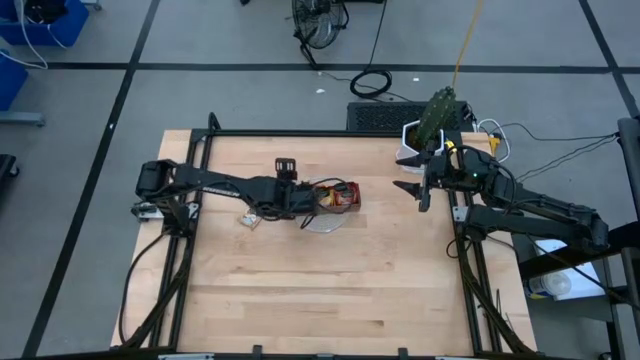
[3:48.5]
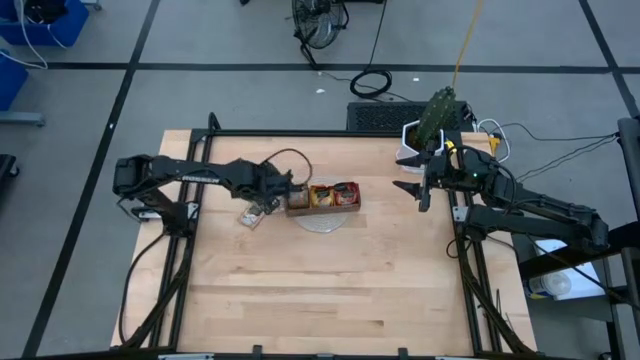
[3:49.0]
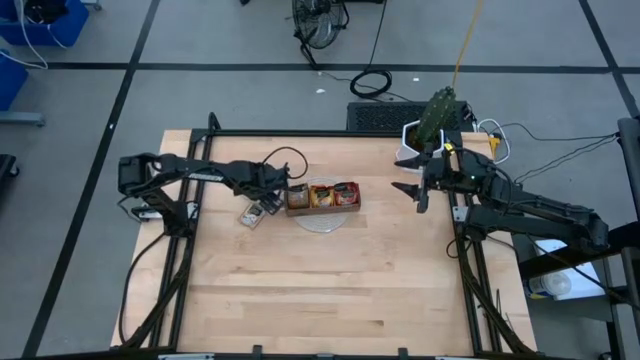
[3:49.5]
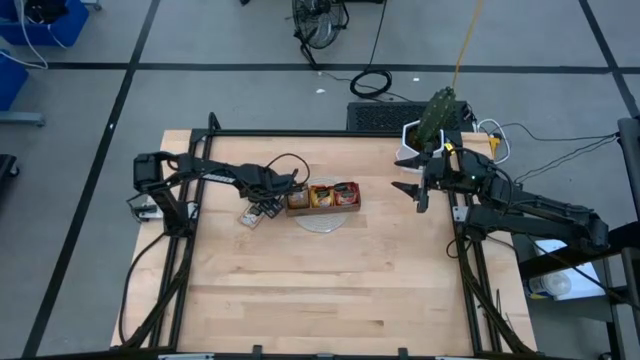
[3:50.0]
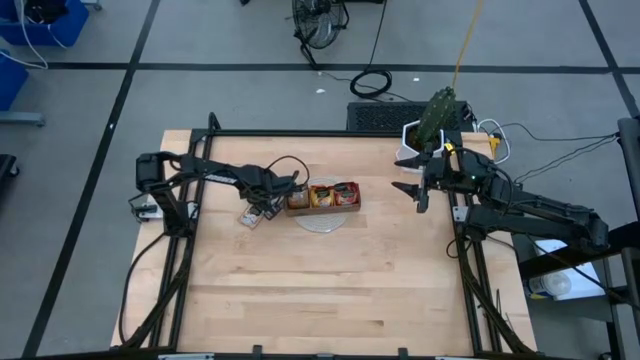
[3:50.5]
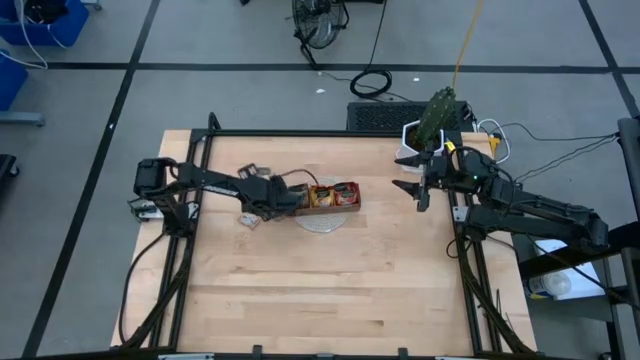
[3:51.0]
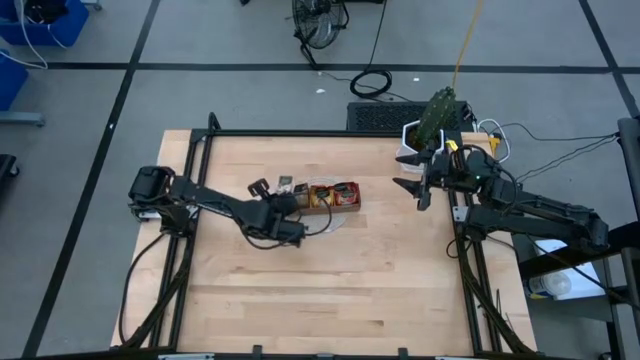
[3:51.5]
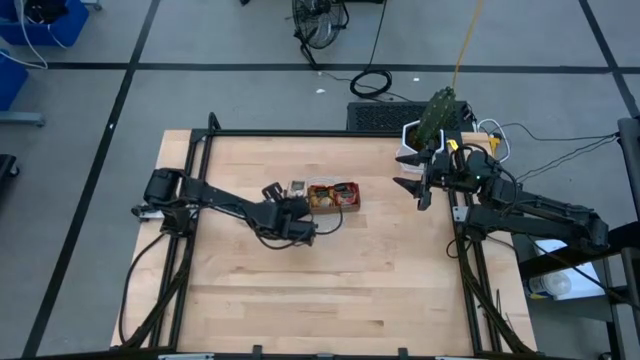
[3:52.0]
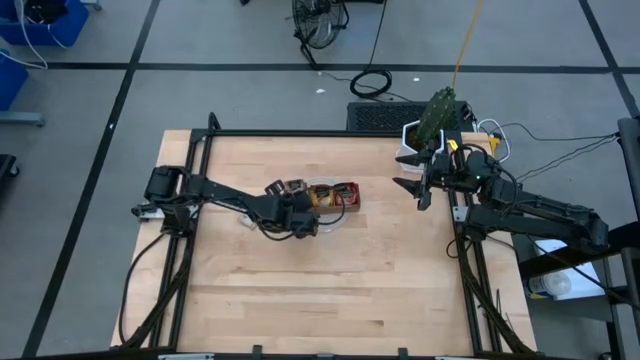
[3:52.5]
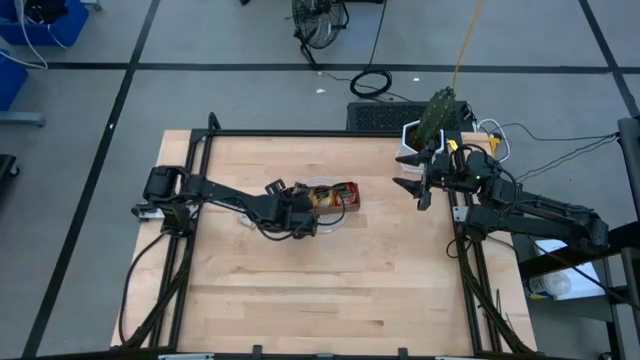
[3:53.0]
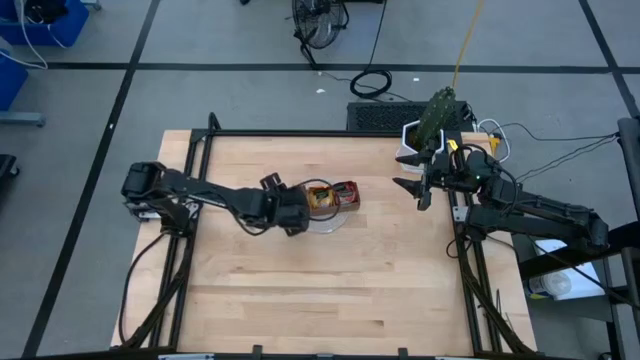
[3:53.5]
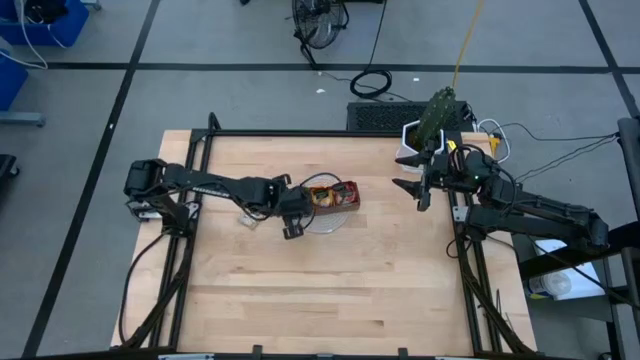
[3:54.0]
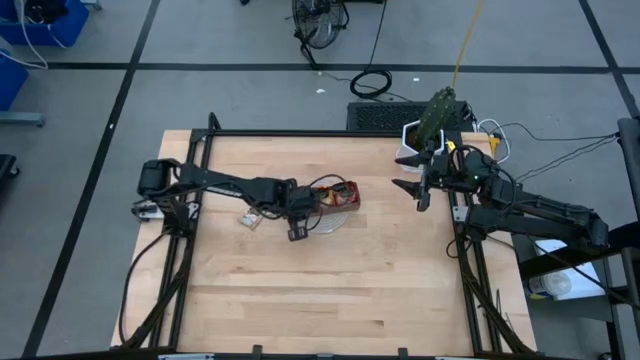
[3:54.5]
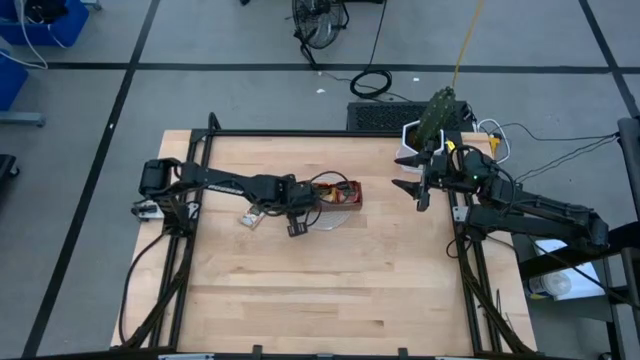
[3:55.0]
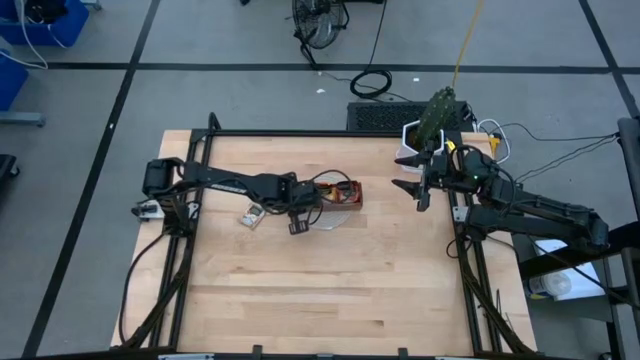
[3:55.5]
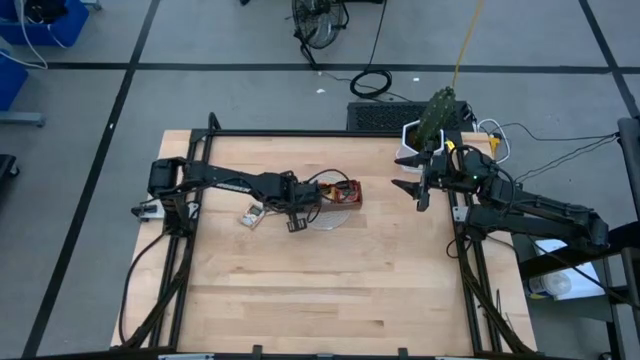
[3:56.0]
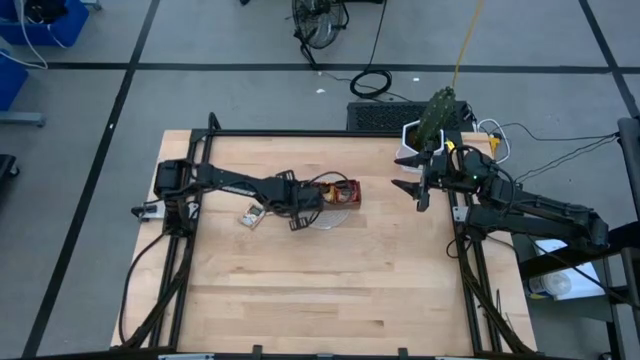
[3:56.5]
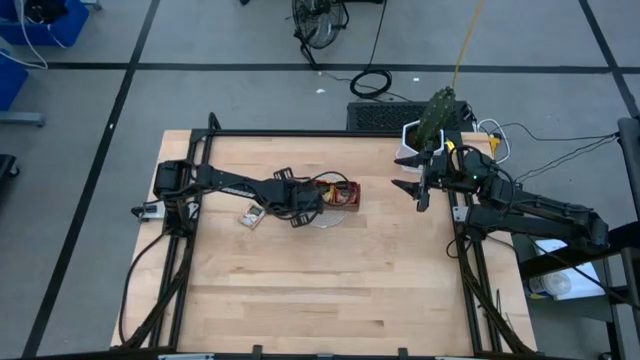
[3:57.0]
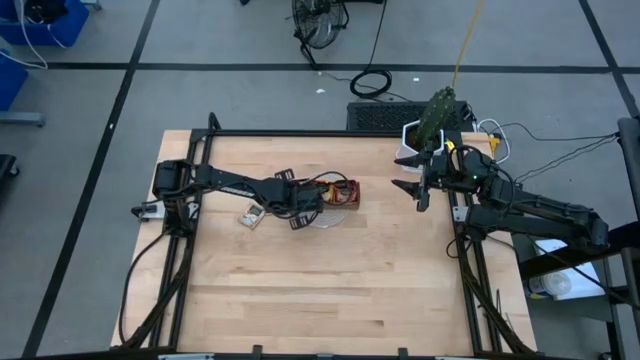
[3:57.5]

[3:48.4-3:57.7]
Task: Pick & Place Tea
Put the tan gold tea bag into the left section of the wood organizer

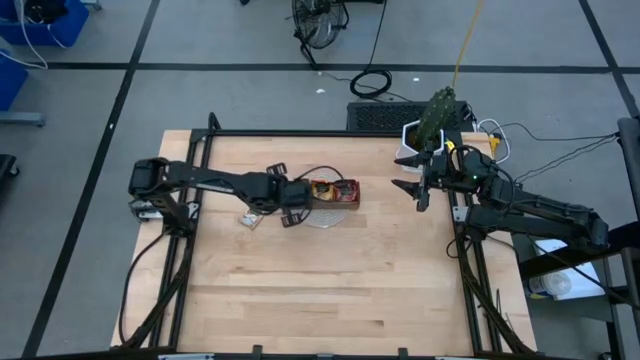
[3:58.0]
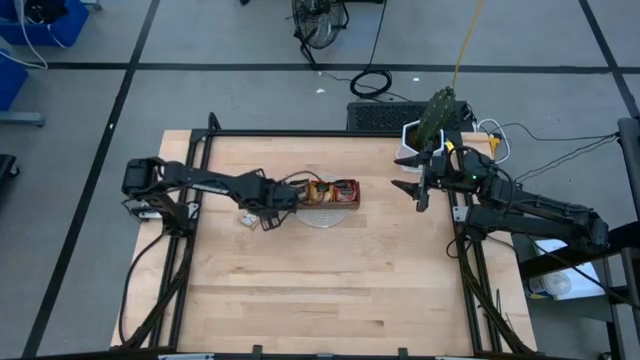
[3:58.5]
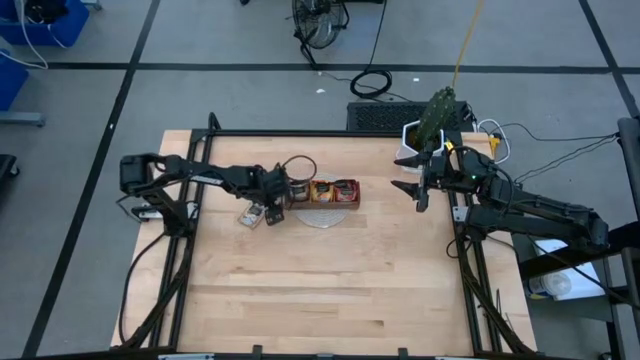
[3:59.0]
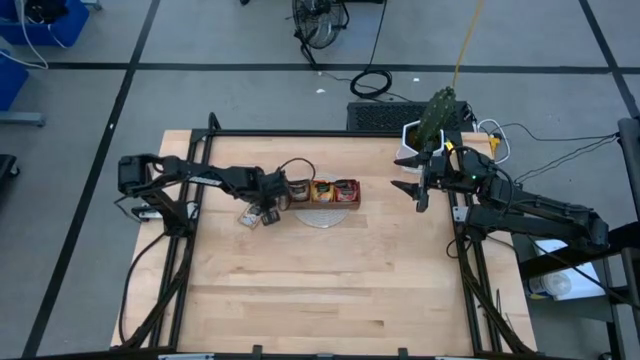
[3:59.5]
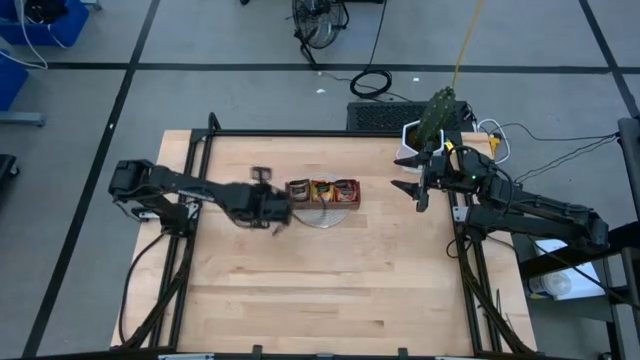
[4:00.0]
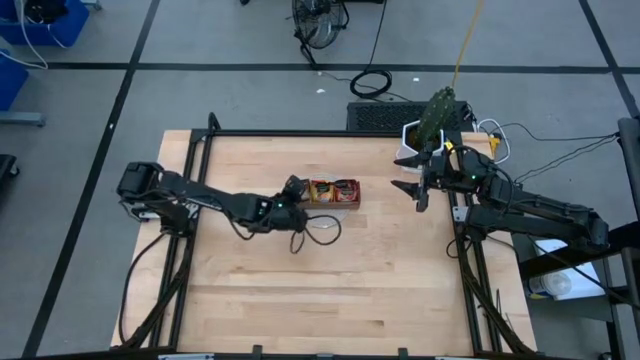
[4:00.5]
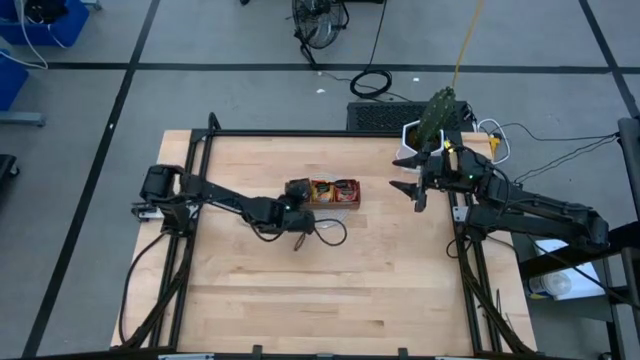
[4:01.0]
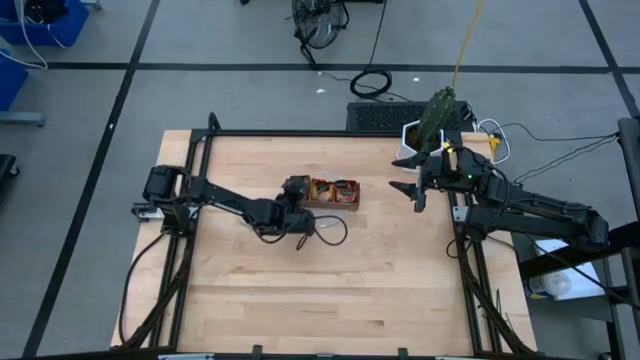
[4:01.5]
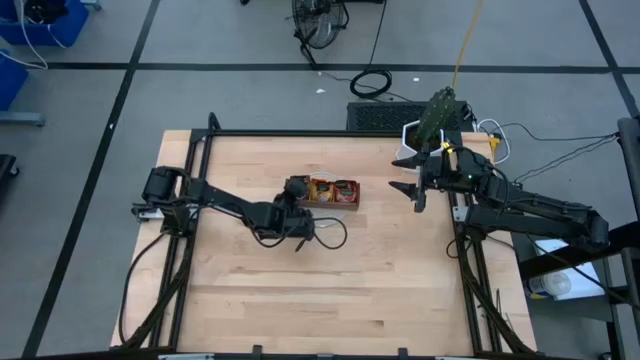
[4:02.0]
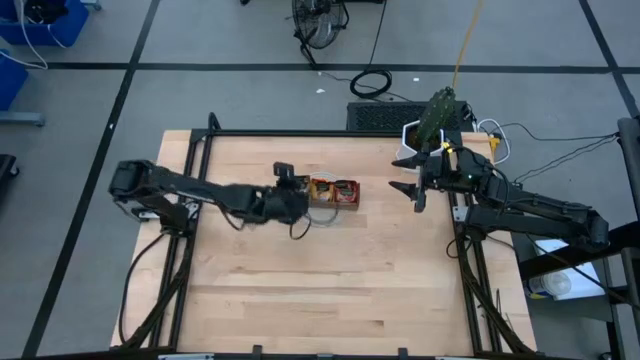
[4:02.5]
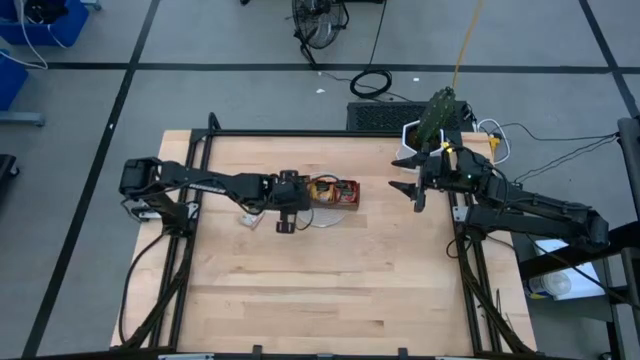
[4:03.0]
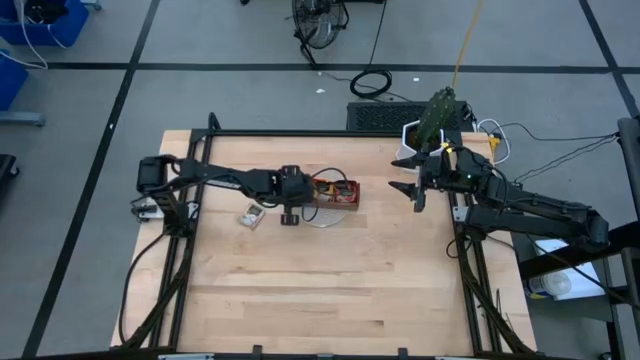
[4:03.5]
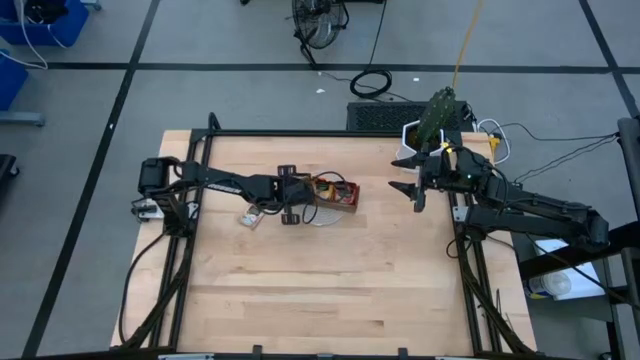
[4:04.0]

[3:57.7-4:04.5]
Put the tan gold tea bag into the left section of the wood organizer

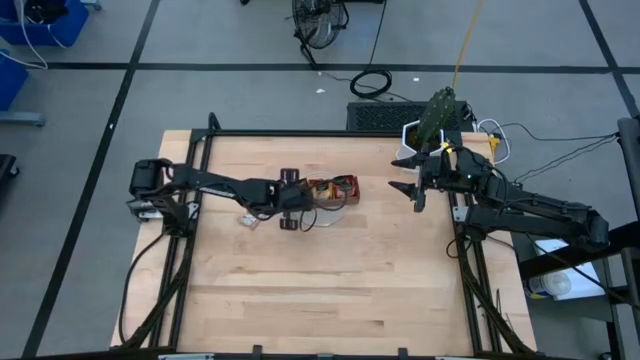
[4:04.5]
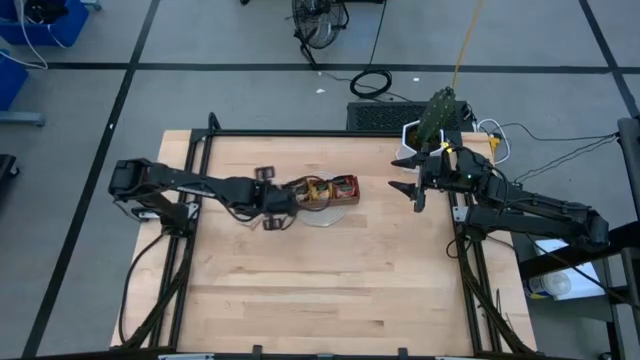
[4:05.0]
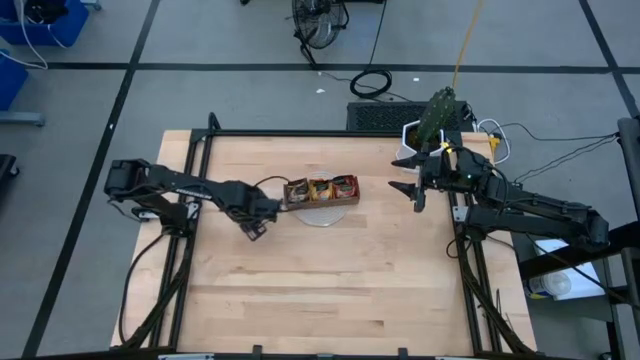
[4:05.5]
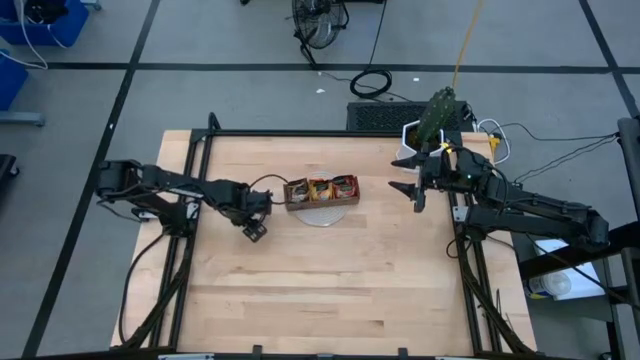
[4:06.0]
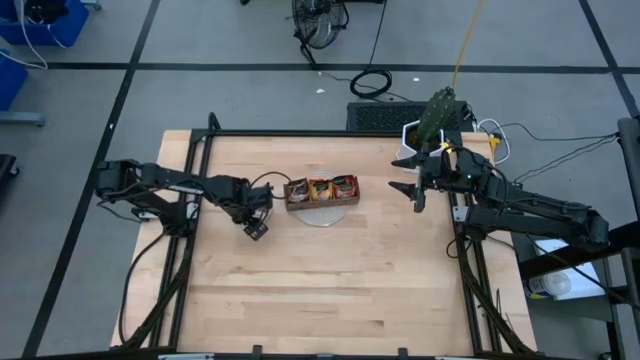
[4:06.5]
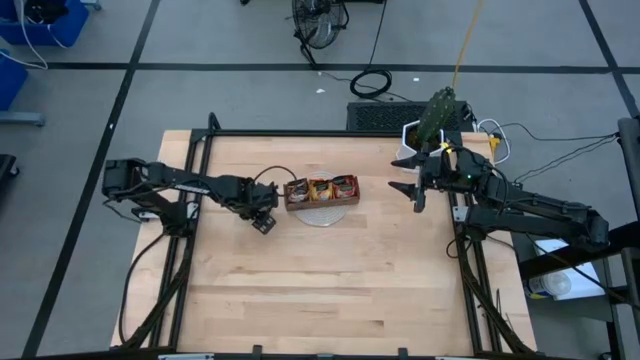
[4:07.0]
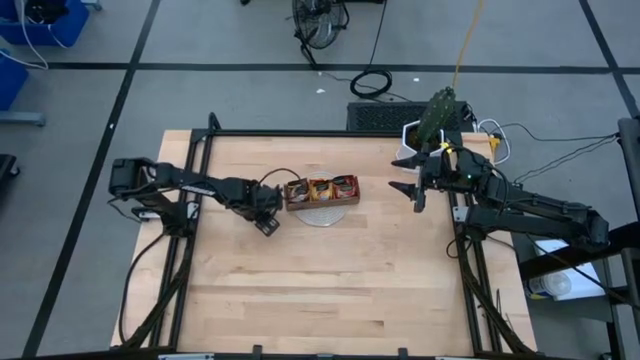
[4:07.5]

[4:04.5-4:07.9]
Put the tan gold tea bag into the left section of the wood organizer

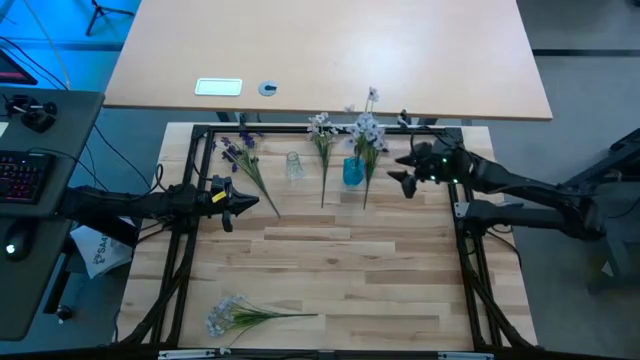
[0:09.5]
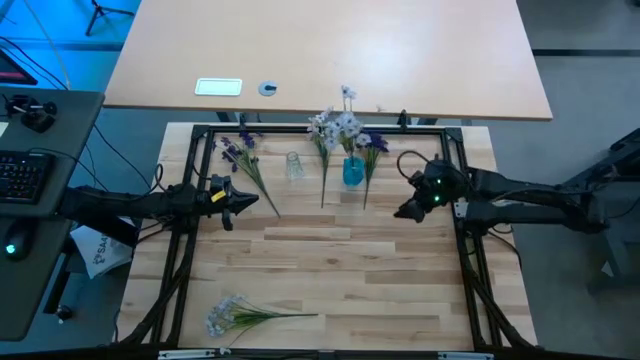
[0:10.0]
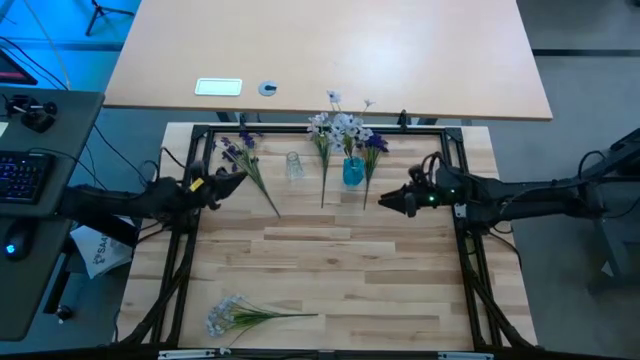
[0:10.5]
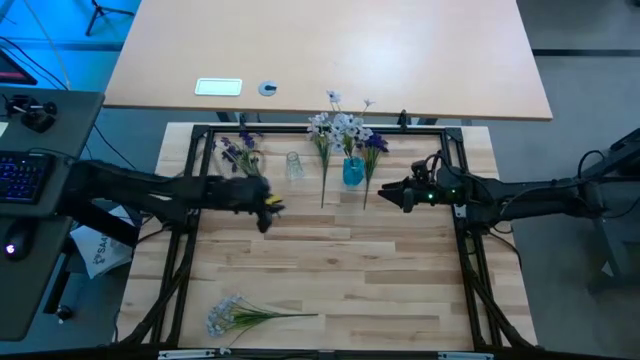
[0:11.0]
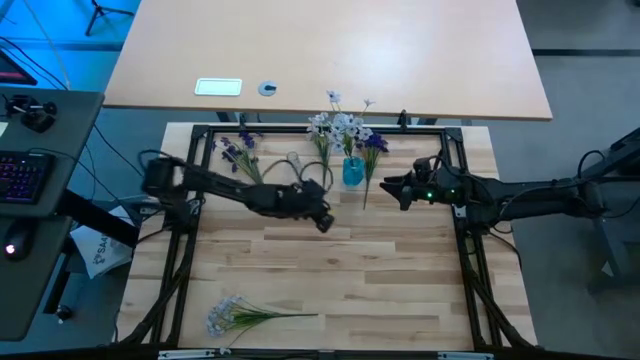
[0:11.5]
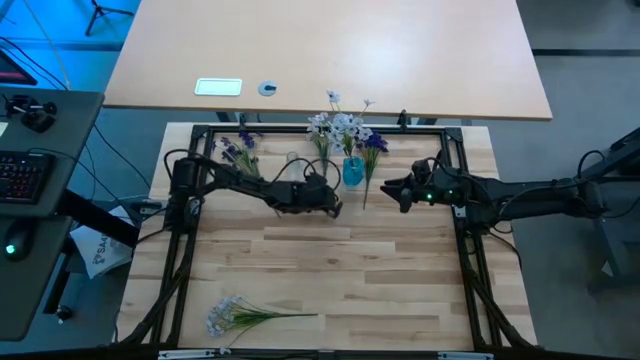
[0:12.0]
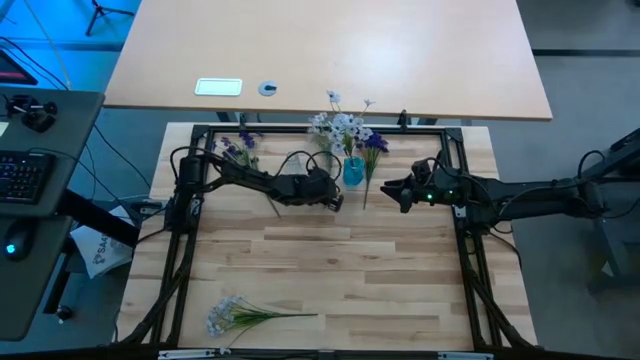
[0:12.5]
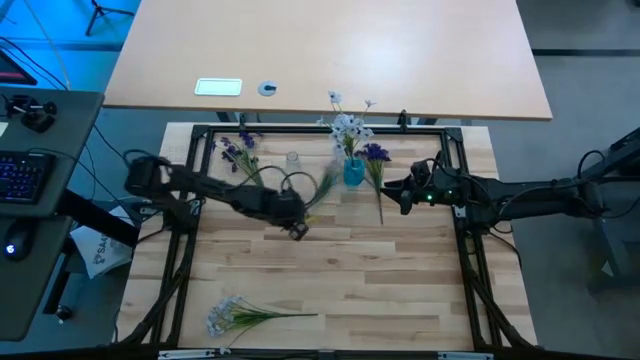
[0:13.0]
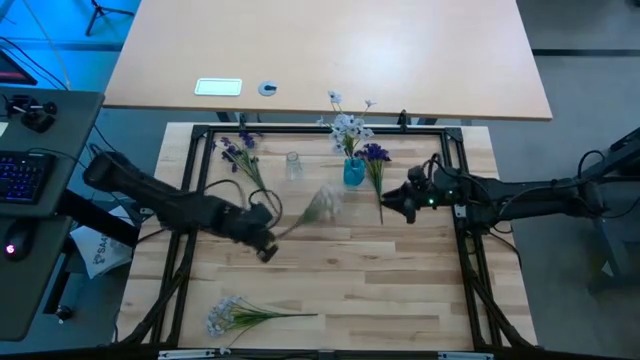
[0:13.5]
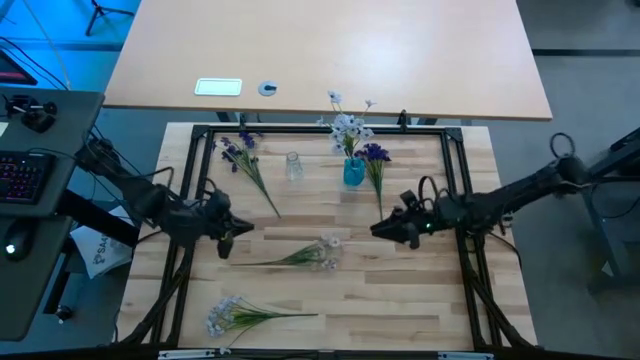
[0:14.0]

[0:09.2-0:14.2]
Task: Sort flowers into vase by color
Put the top white flowers into the blue vase
